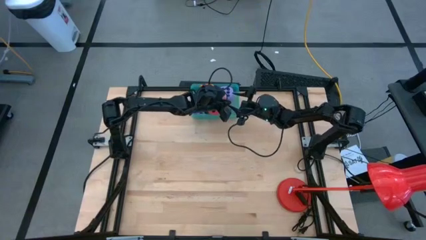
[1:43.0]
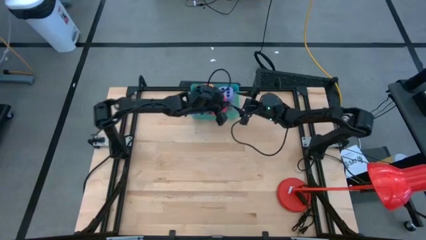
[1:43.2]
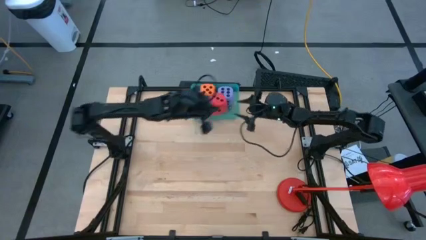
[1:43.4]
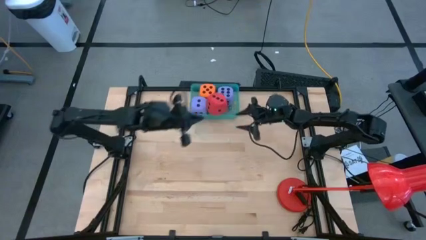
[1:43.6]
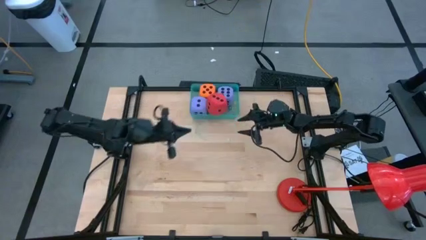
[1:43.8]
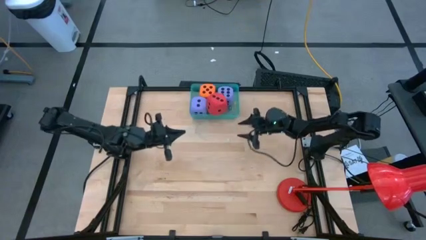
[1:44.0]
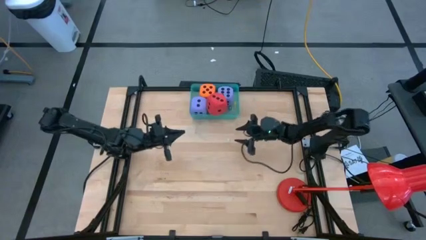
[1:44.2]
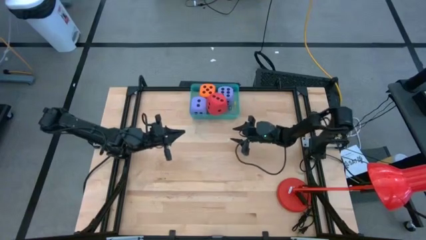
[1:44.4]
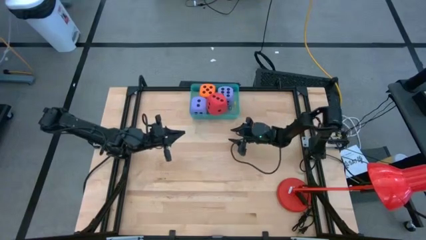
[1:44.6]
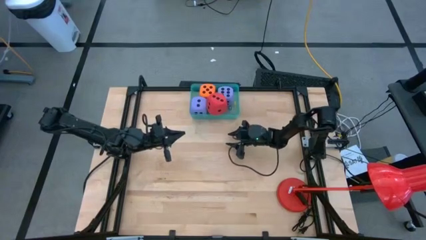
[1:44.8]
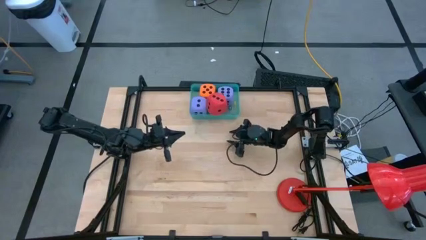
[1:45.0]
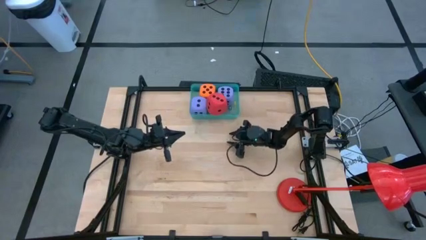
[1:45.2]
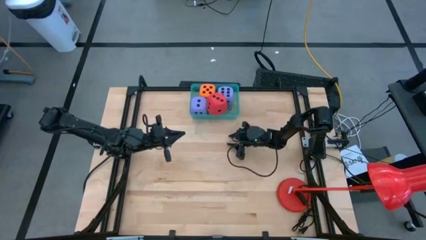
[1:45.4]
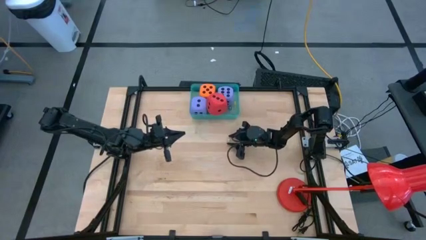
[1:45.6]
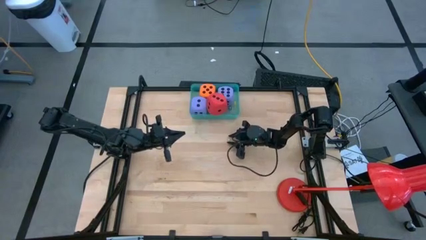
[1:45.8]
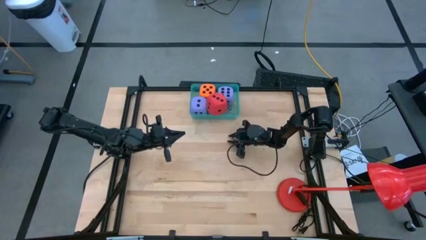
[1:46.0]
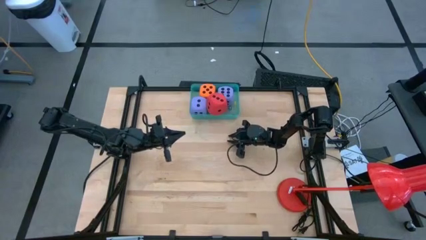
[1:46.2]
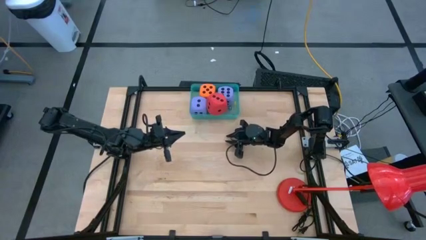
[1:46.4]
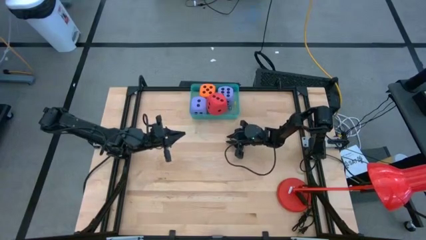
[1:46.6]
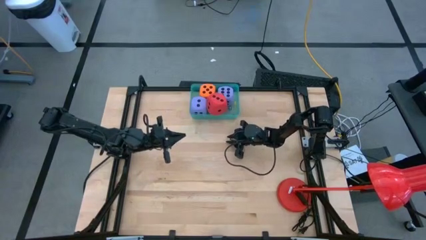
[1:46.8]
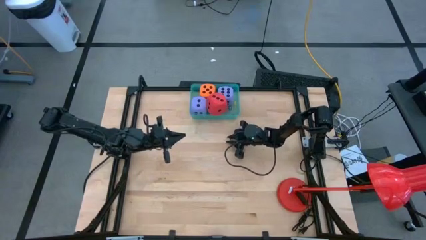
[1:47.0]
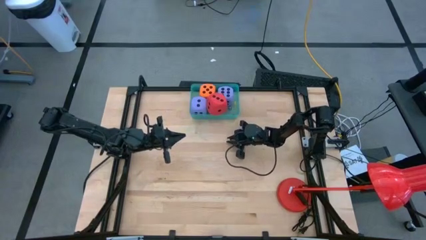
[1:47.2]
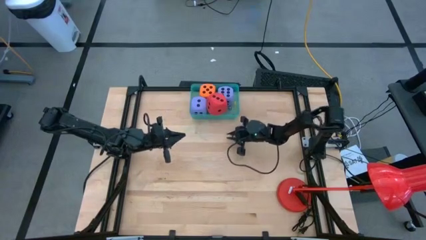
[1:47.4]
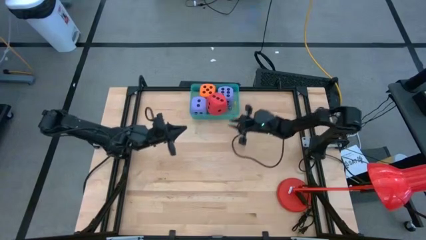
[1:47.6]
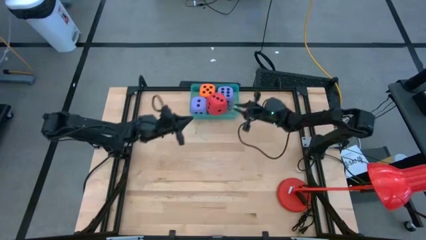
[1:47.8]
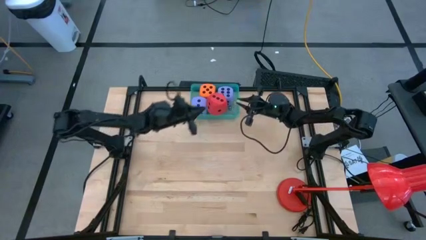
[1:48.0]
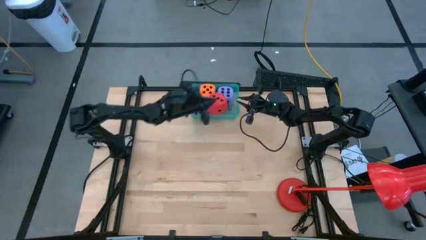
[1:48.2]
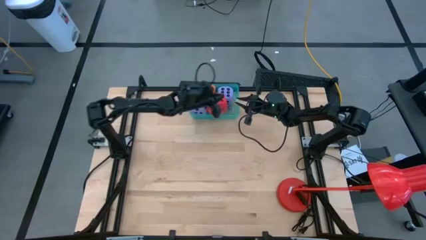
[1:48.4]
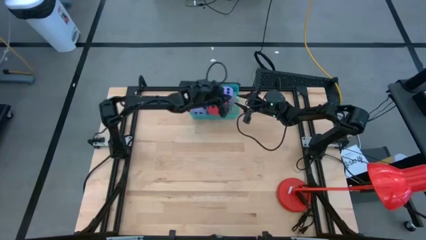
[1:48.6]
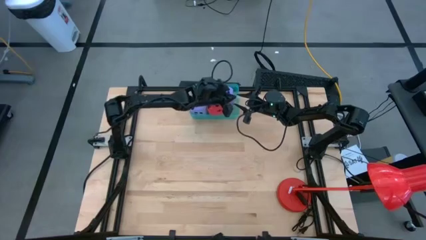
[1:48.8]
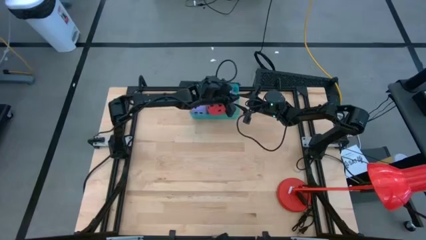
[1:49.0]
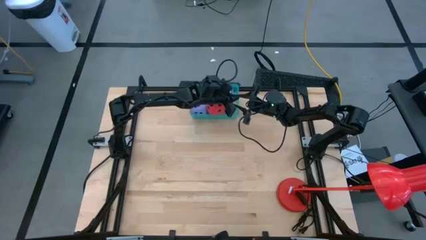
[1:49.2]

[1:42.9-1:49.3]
Task: Pick & Place Dice
Put the yellow dice into the green bin

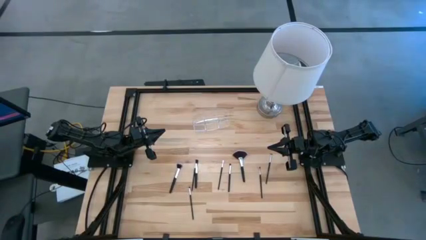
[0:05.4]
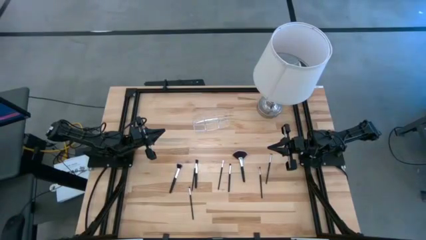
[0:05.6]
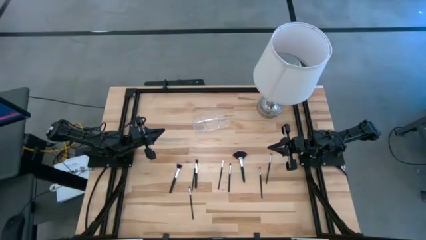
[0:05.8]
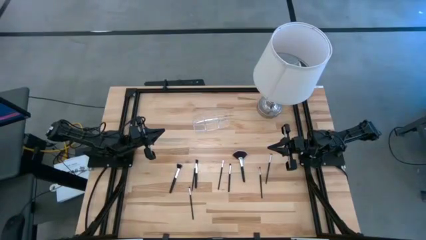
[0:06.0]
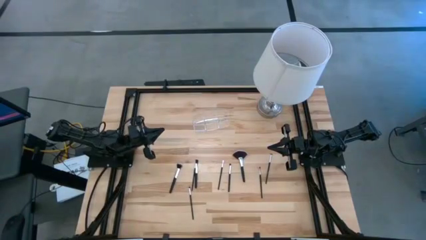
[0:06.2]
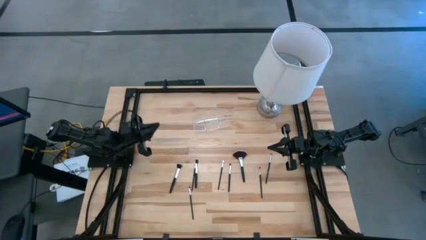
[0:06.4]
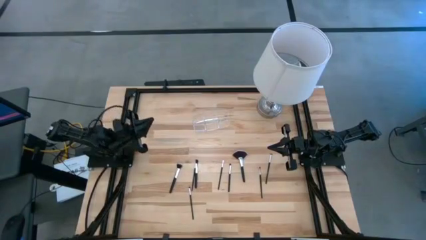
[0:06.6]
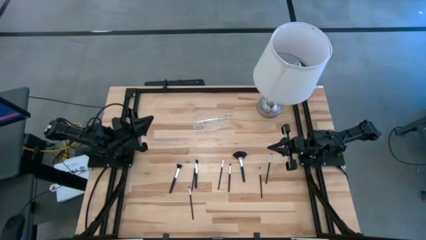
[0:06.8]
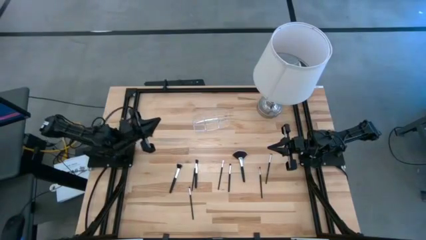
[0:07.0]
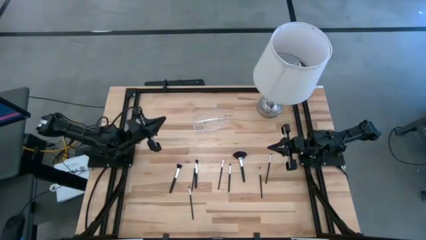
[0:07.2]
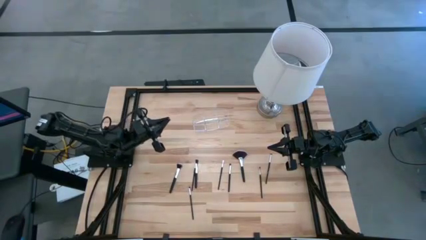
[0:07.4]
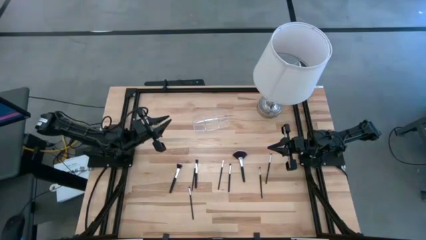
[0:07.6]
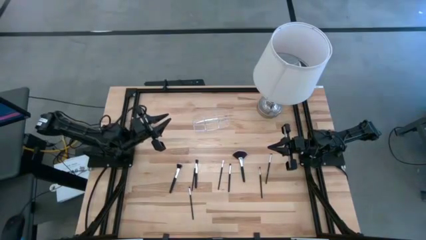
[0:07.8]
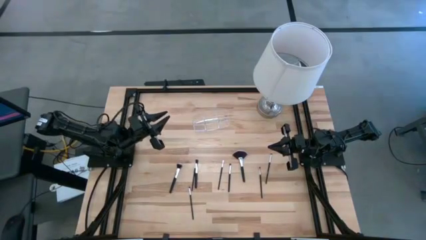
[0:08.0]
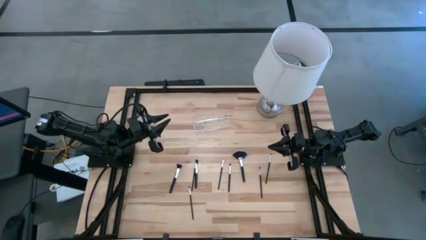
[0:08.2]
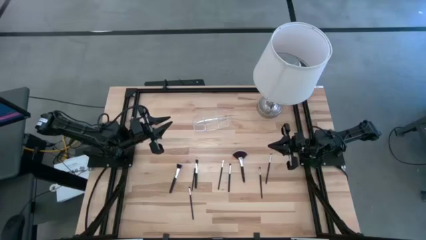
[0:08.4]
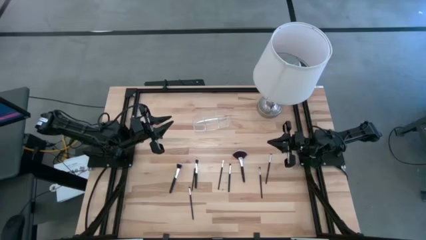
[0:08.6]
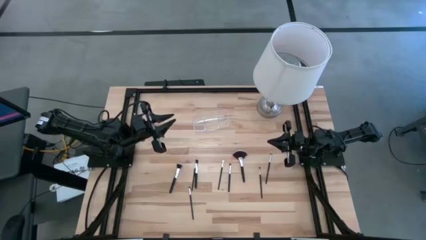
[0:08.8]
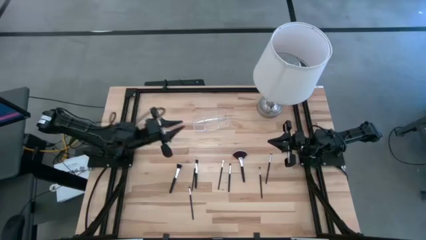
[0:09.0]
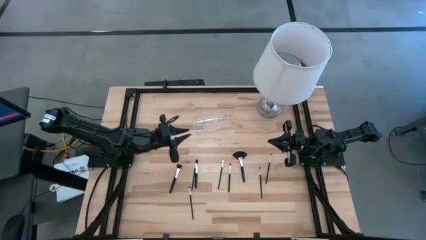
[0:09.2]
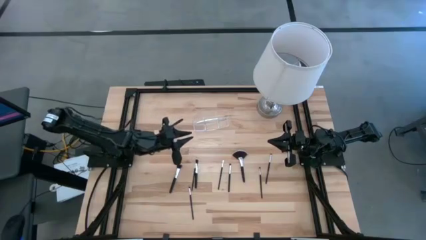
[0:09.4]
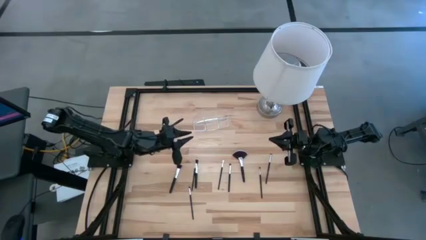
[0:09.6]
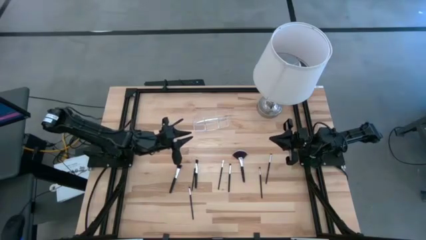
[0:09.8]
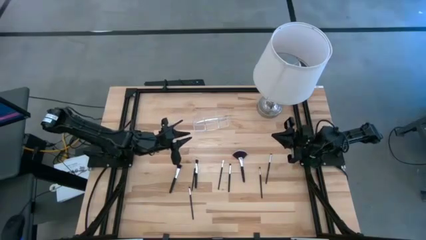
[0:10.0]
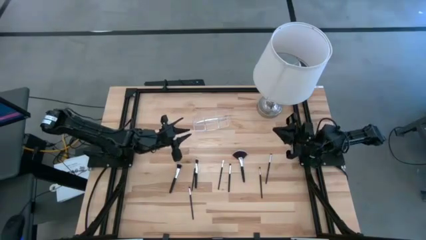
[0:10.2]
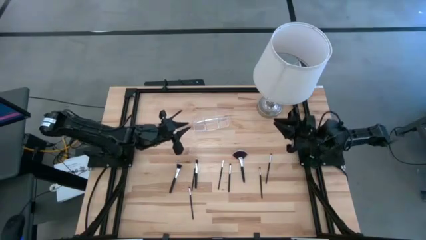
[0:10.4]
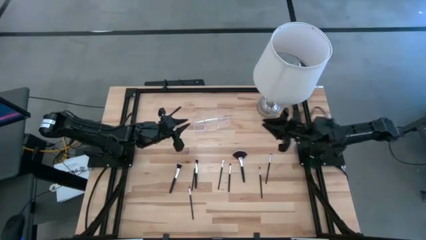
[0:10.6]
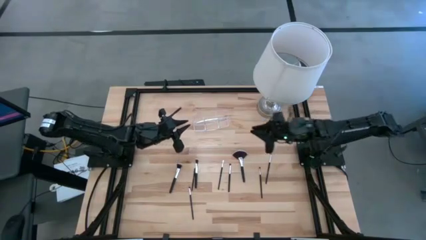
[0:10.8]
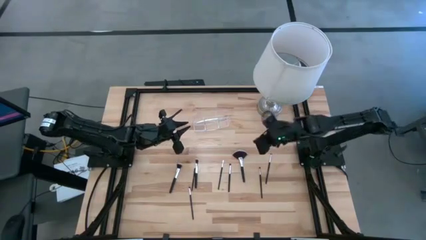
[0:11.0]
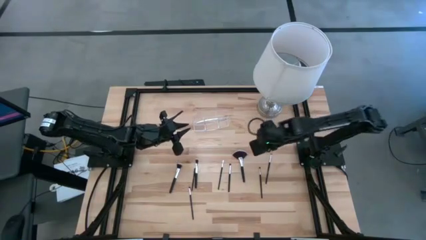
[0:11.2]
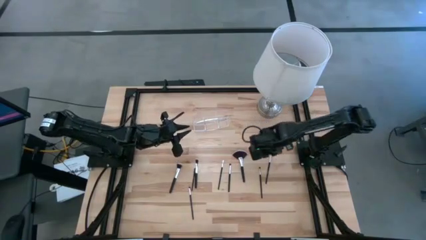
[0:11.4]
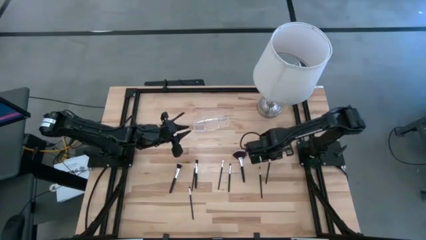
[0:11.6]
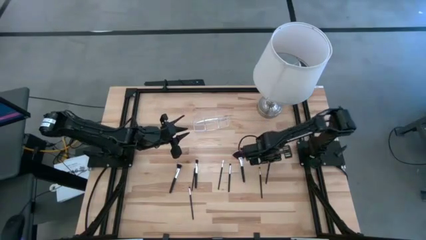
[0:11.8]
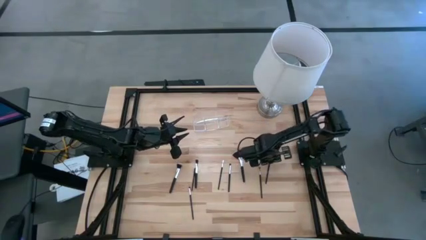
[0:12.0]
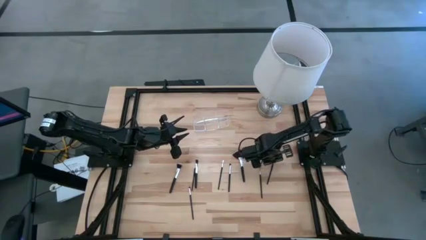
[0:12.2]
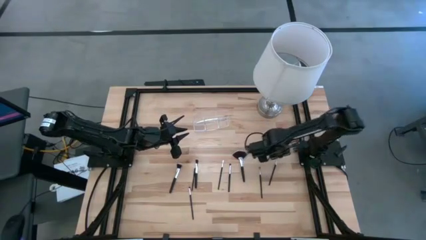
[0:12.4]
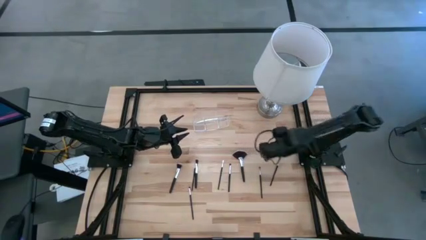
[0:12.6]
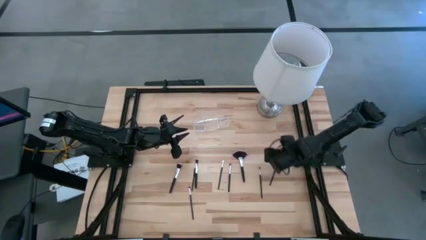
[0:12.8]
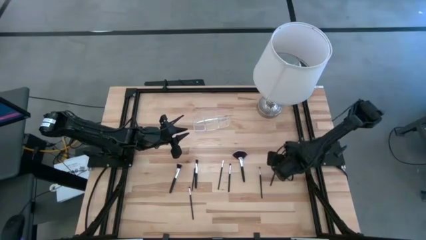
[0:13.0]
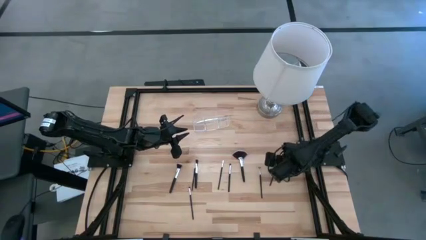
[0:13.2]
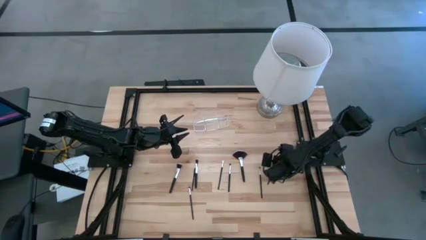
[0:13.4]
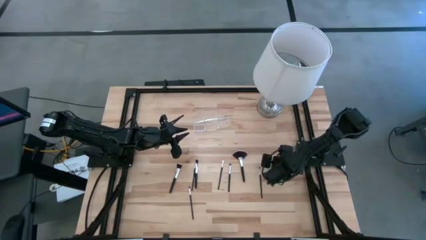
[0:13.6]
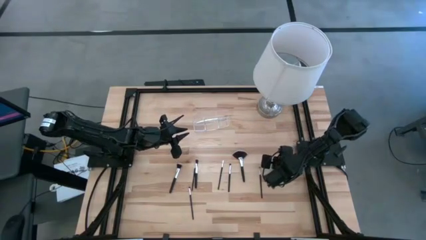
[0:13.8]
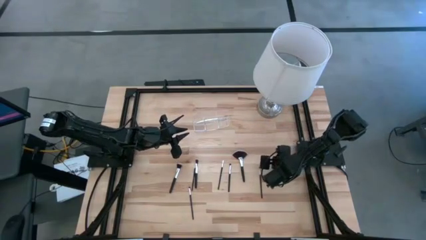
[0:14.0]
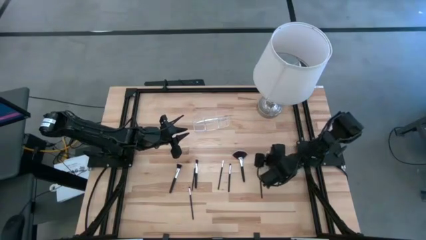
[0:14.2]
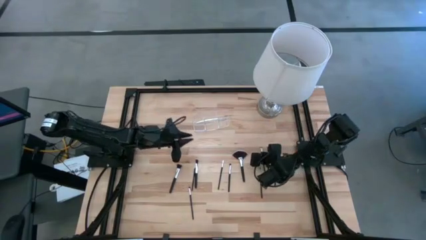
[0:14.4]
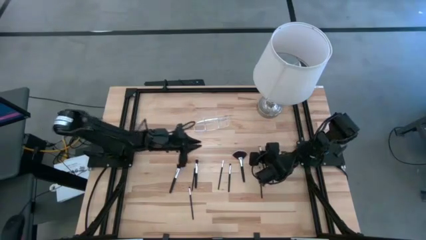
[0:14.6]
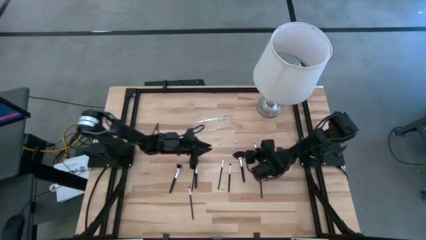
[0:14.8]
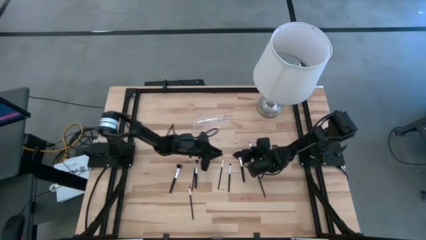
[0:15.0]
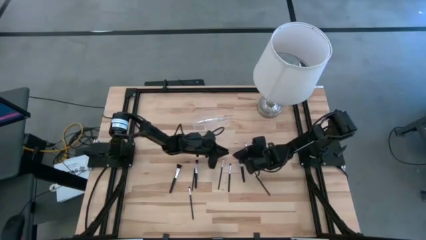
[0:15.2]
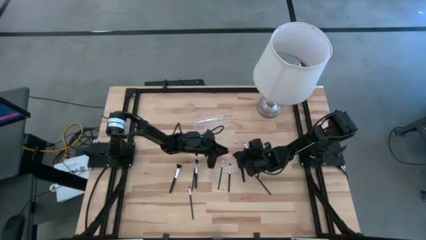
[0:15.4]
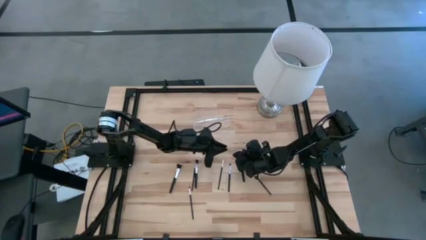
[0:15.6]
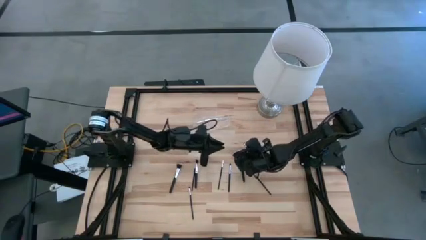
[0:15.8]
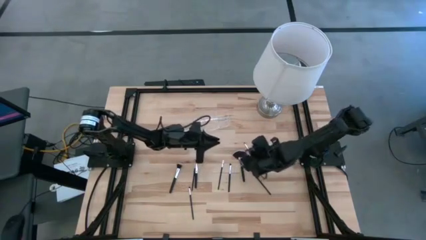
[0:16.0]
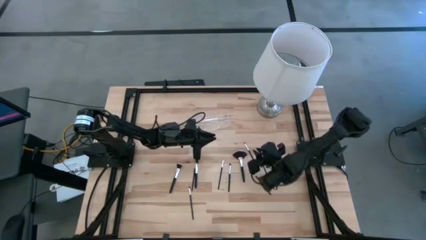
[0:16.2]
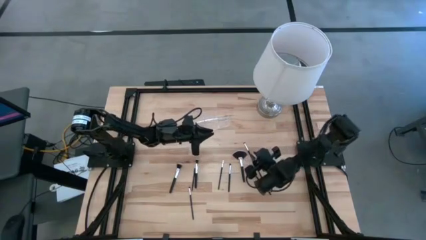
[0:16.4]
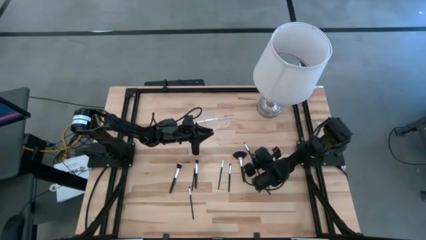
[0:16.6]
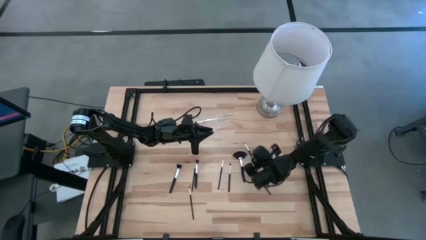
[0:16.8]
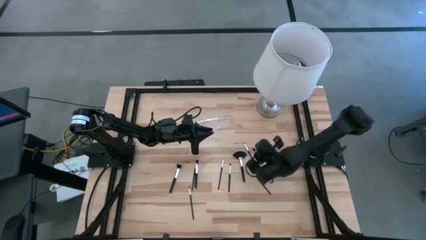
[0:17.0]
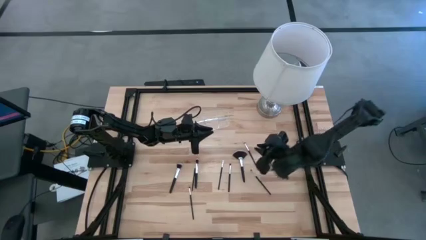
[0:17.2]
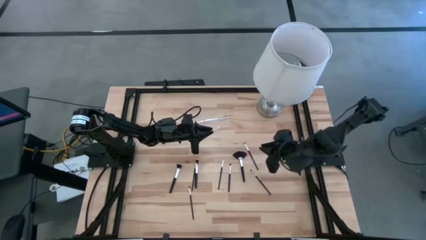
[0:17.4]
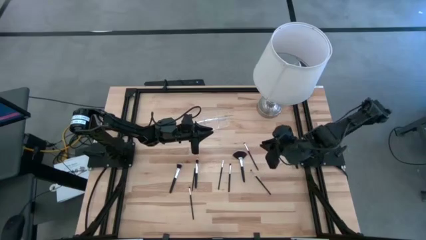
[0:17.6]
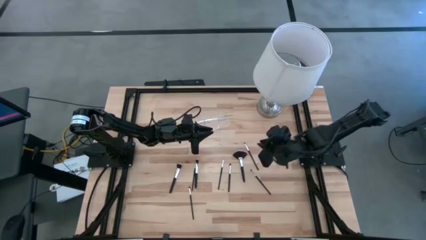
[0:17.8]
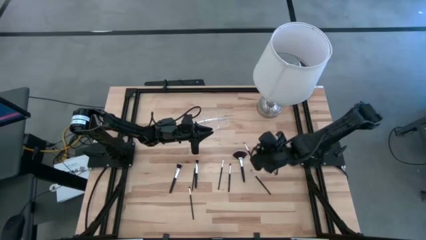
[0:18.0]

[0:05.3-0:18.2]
Task: Sort items
Put the brush into the transparent organizer
